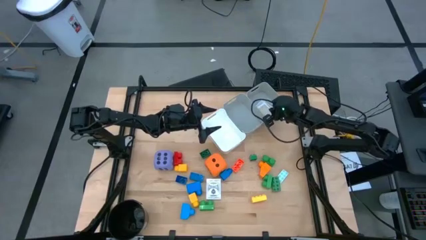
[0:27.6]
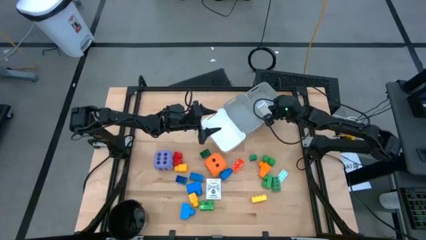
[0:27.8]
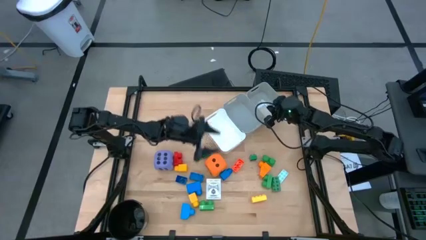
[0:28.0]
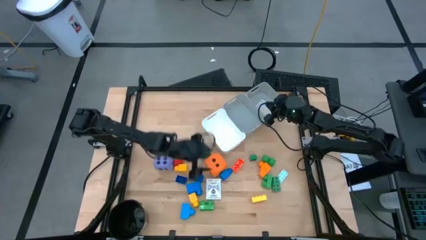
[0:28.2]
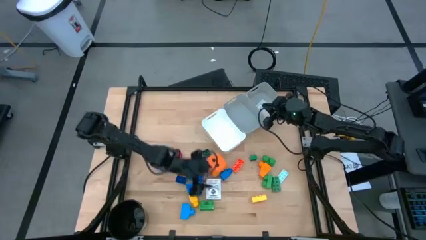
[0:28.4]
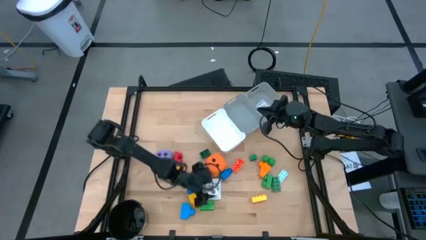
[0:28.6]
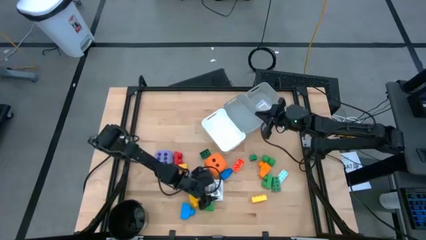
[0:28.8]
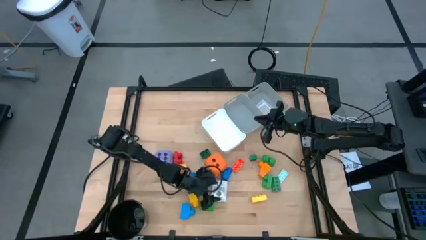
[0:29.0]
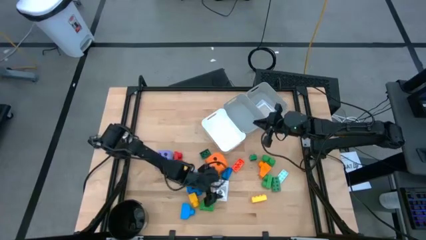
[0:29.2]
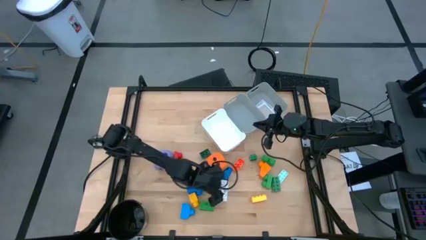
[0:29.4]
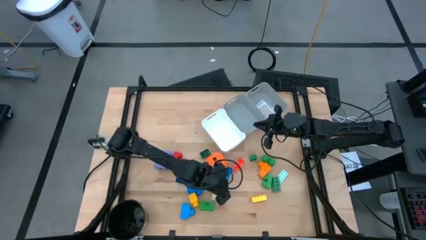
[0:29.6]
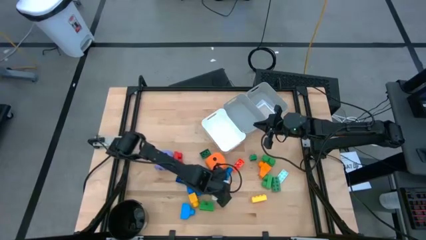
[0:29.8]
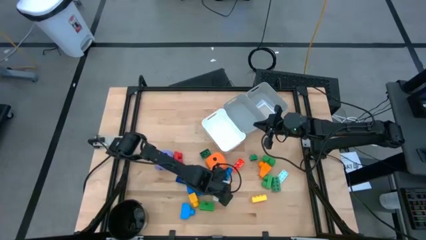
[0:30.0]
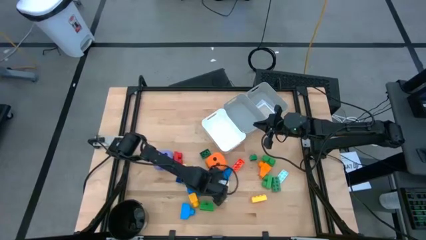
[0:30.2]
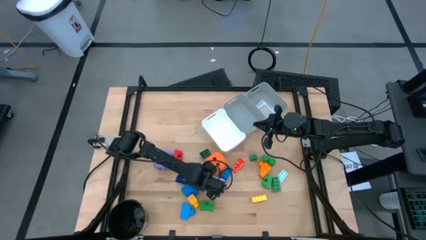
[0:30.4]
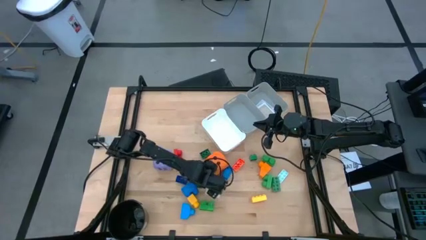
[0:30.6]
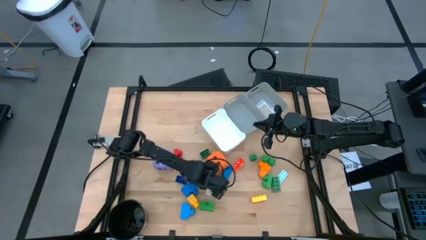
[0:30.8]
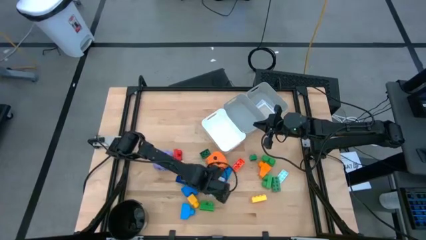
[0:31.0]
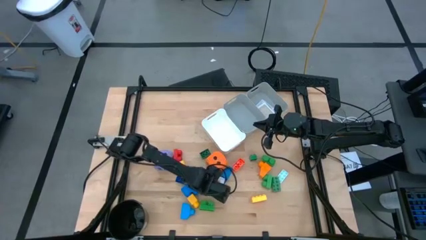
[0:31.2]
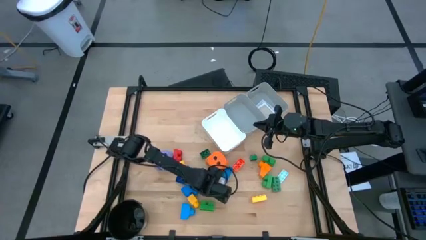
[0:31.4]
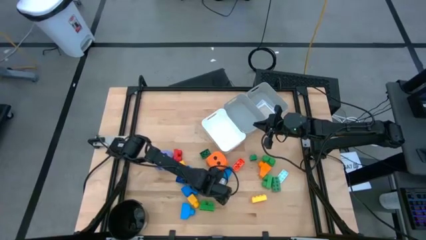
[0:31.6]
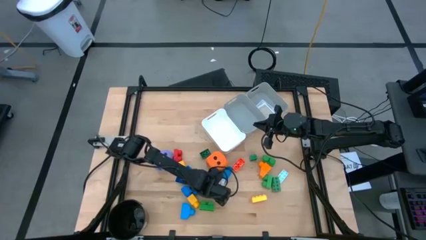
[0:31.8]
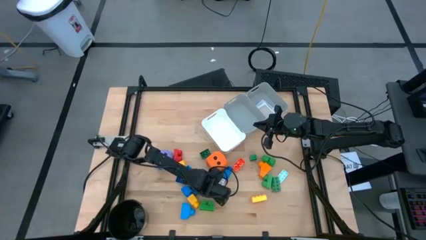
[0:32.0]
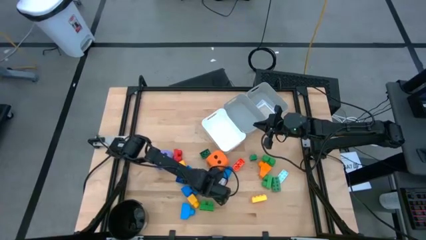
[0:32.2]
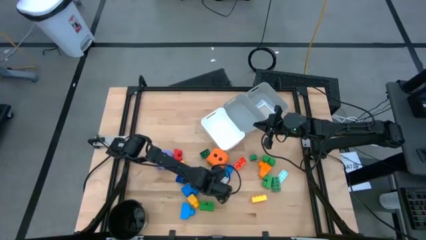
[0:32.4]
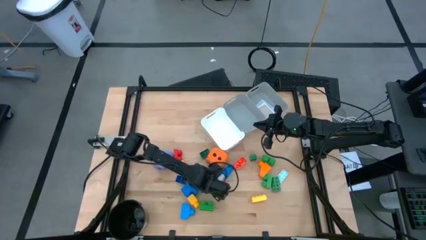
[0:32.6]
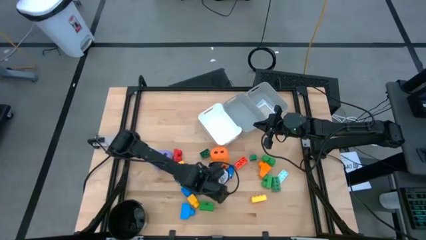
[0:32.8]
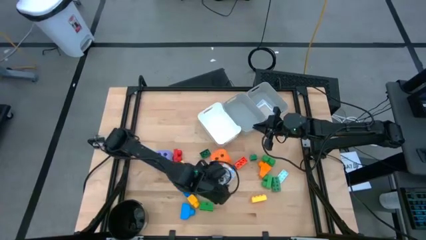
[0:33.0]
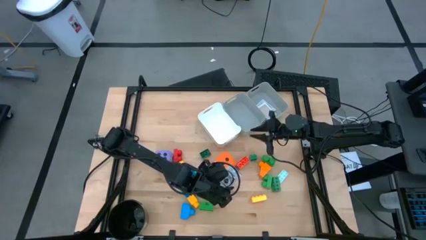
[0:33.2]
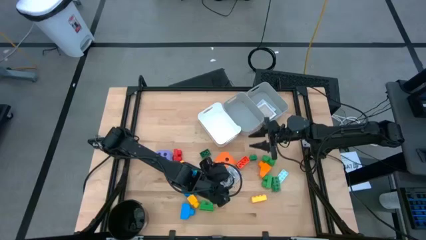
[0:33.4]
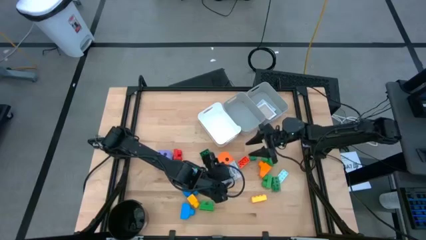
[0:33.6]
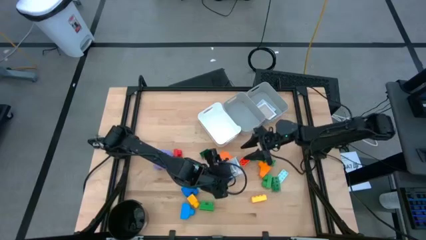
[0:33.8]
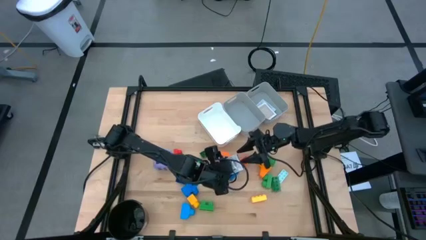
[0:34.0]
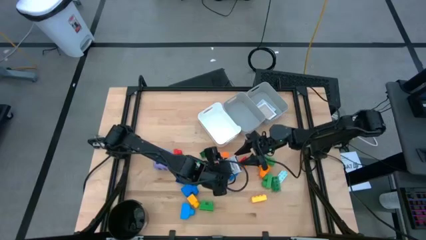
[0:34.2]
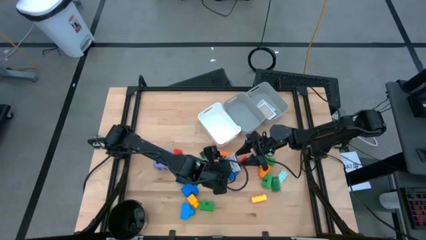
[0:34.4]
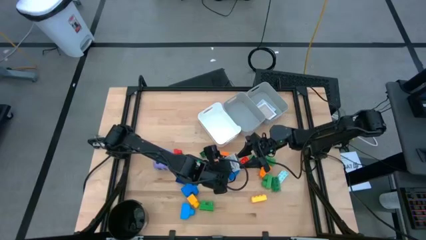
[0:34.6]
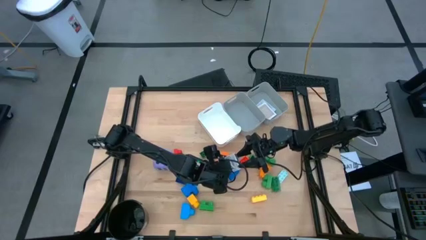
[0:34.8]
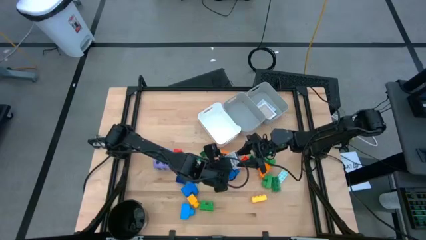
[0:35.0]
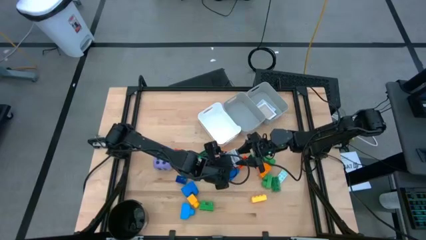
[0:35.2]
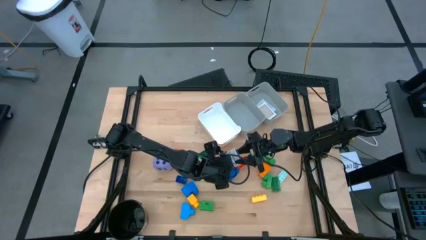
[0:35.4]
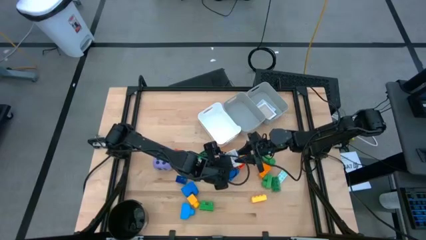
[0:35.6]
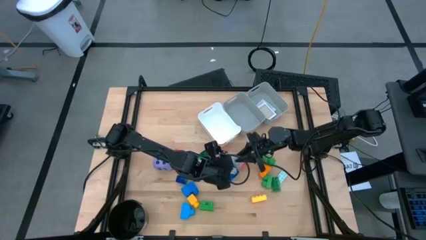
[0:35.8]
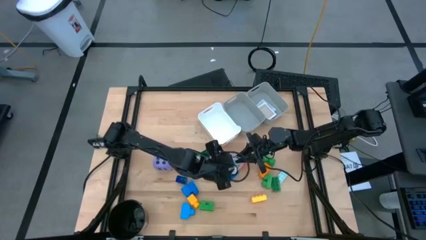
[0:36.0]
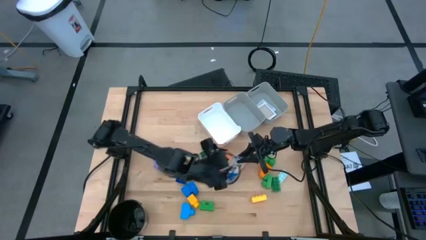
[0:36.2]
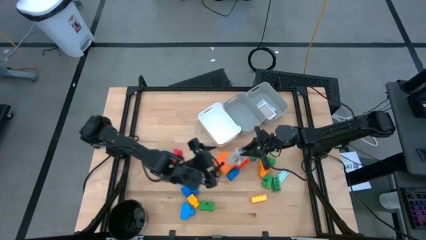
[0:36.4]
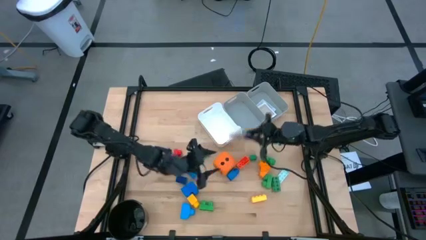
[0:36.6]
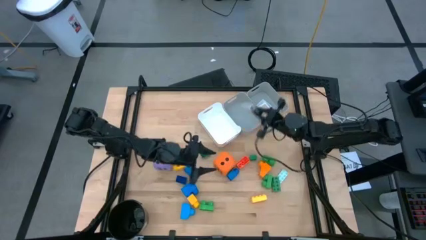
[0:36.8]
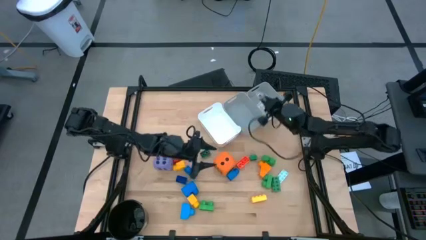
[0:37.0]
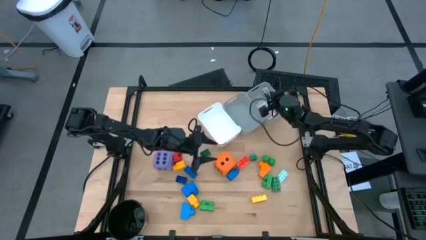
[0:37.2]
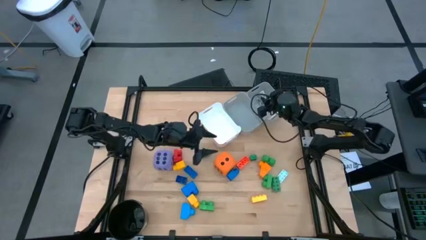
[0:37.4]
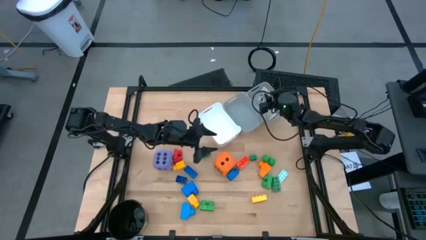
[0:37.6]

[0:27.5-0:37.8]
Task: Pick & Place Toys
Put the black deck of cards into the right grey bin

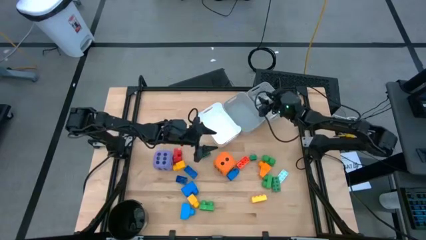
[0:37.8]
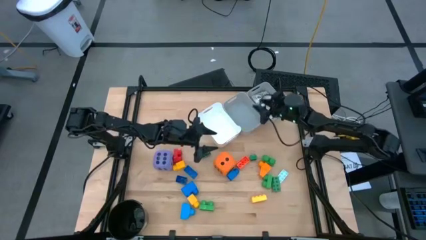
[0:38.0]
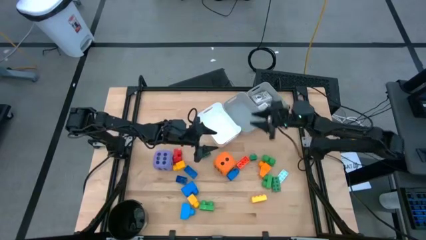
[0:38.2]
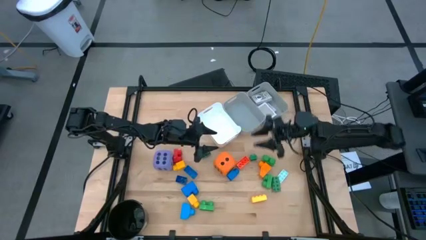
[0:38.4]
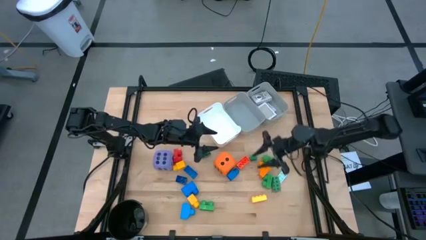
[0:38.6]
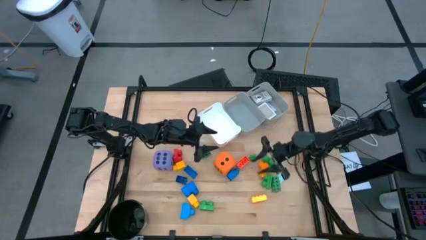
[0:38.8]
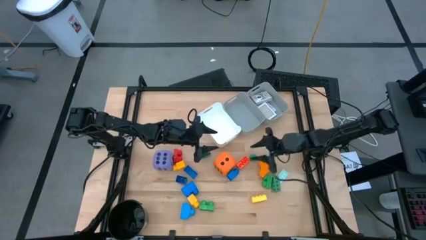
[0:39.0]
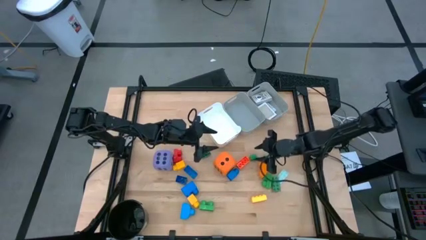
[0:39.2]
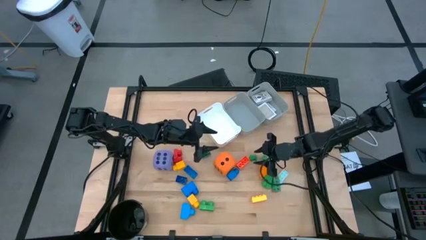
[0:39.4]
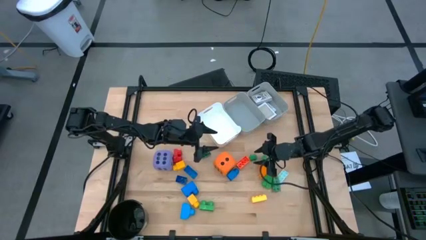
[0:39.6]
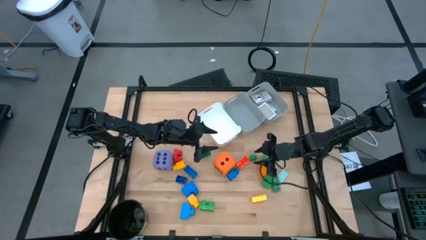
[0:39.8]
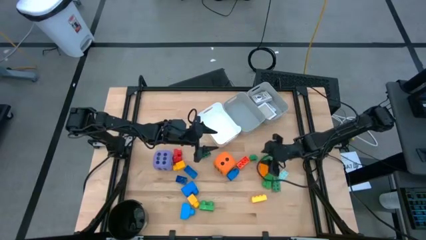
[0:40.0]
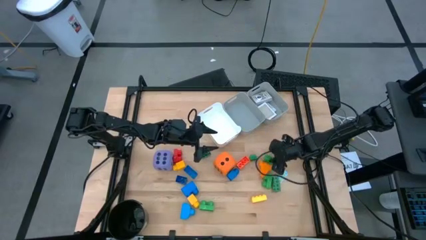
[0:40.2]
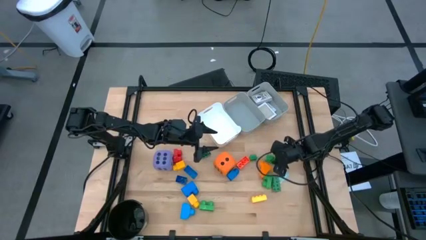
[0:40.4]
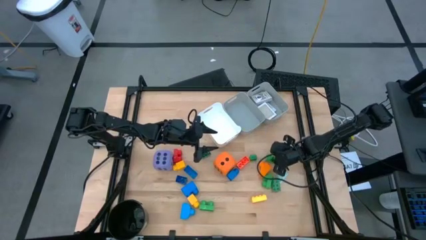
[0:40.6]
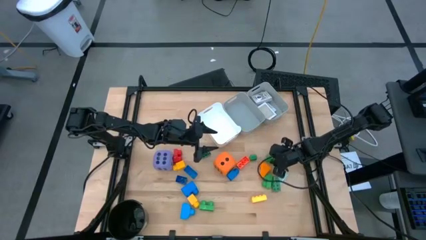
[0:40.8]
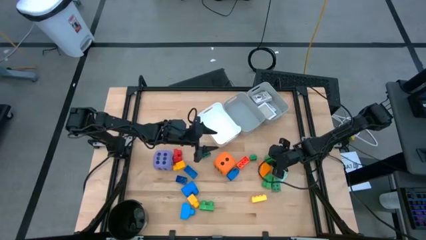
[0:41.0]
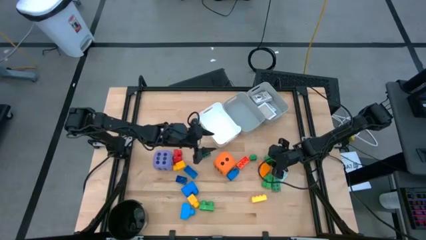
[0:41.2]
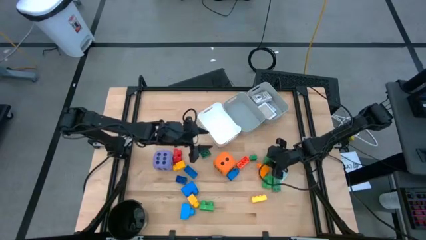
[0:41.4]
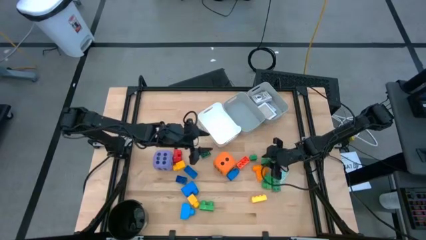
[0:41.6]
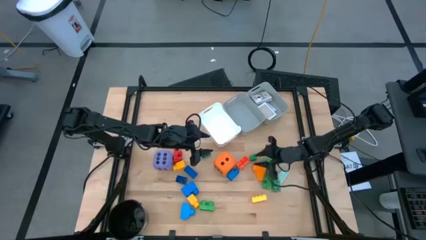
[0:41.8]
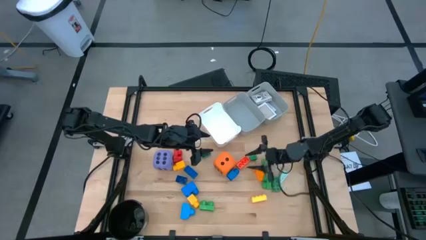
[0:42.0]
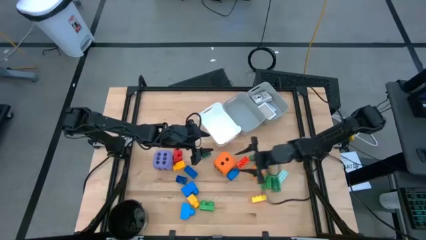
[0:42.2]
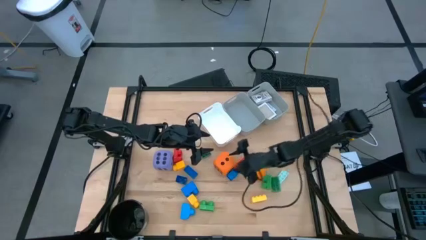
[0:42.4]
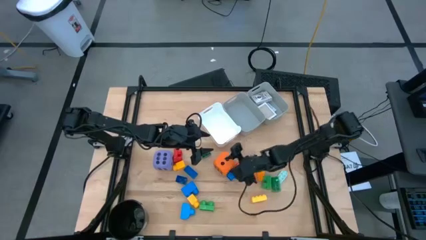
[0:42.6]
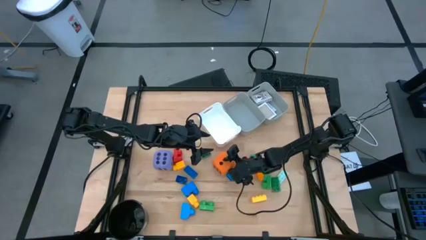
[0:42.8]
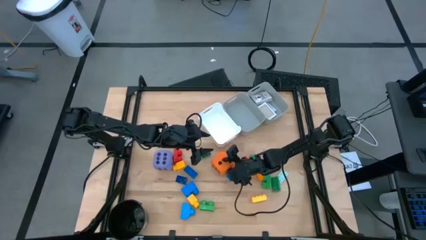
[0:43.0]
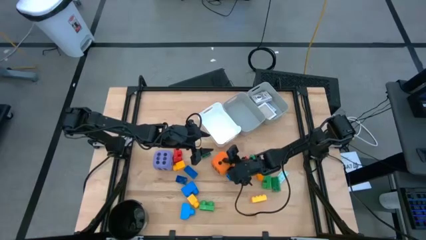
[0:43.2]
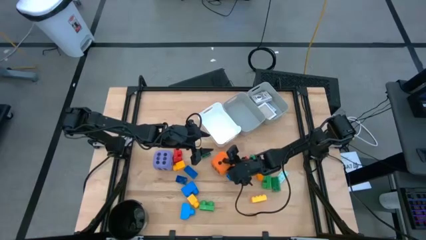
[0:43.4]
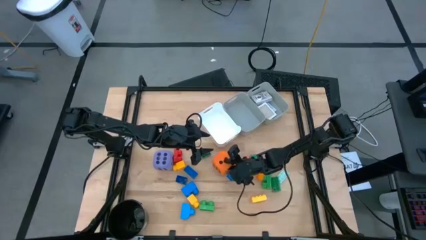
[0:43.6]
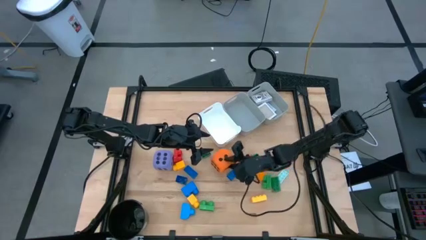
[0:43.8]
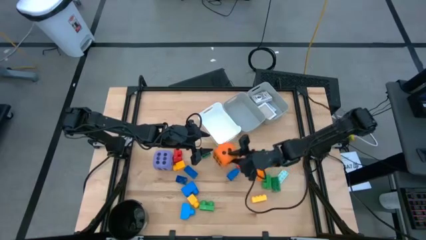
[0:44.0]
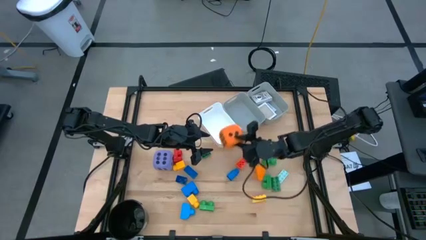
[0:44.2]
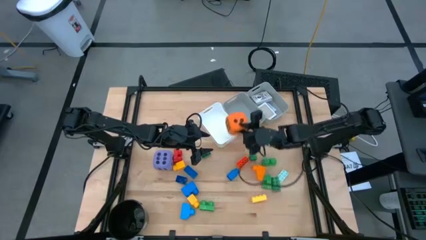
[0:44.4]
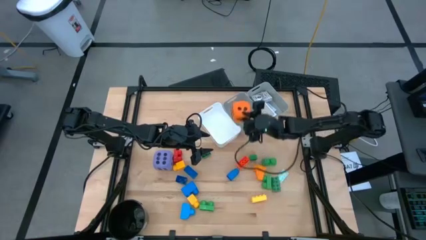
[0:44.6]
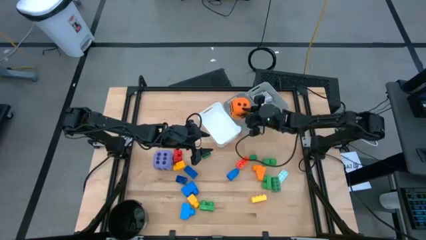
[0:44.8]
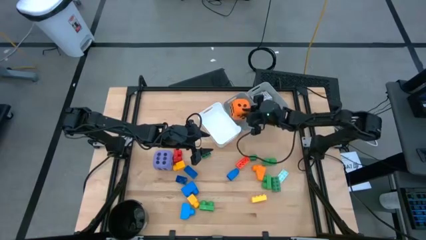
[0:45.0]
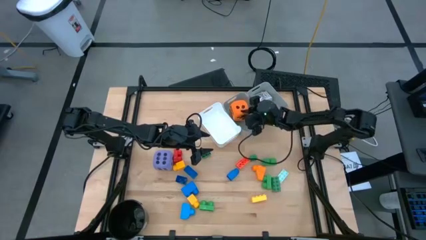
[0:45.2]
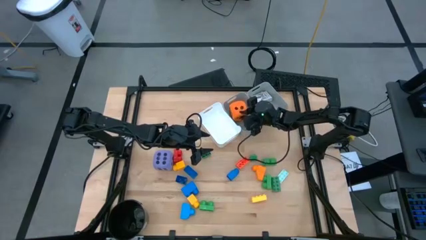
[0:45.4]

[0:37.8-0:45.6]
Put the orange die into the left grey bin
